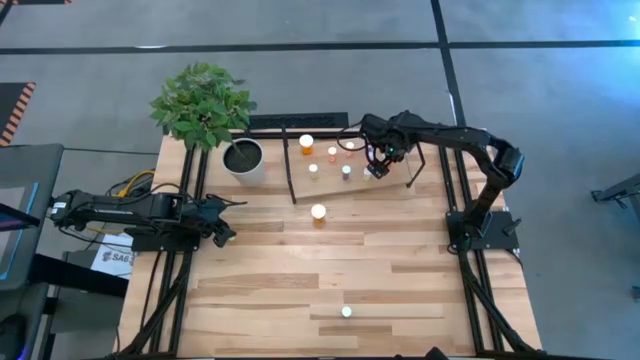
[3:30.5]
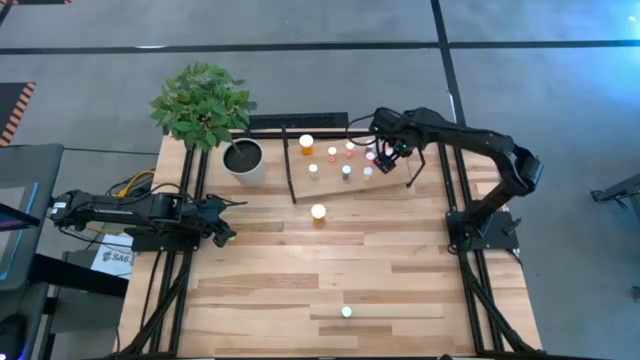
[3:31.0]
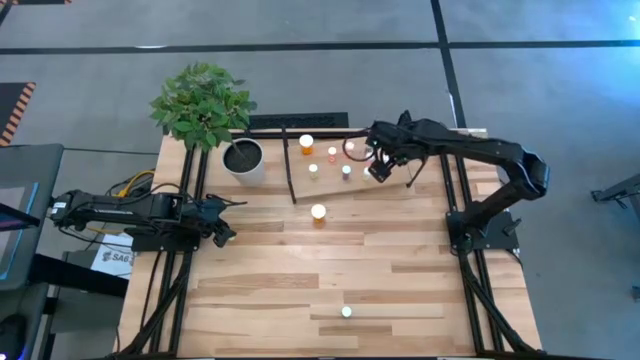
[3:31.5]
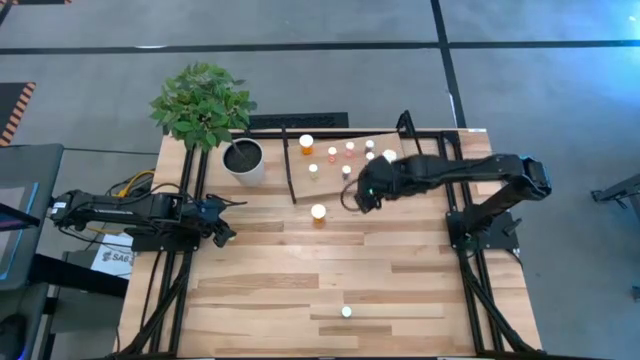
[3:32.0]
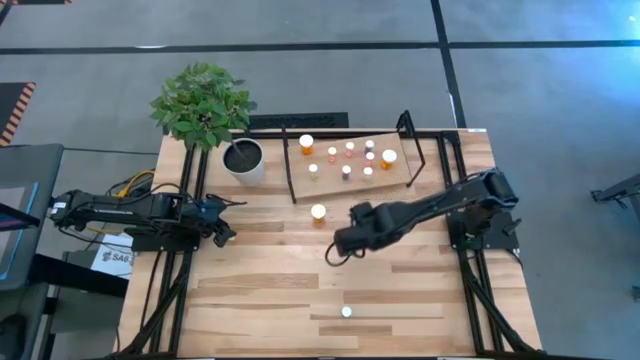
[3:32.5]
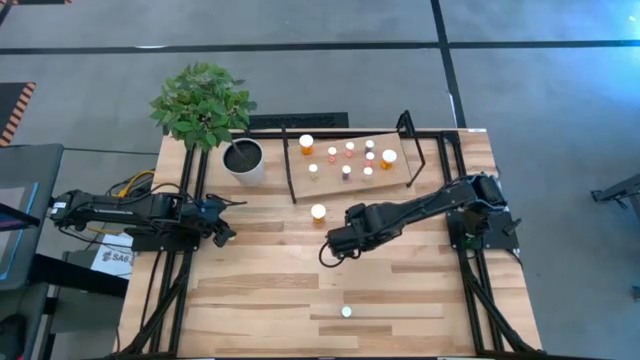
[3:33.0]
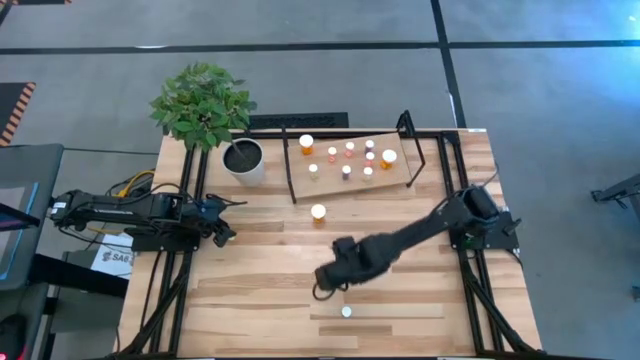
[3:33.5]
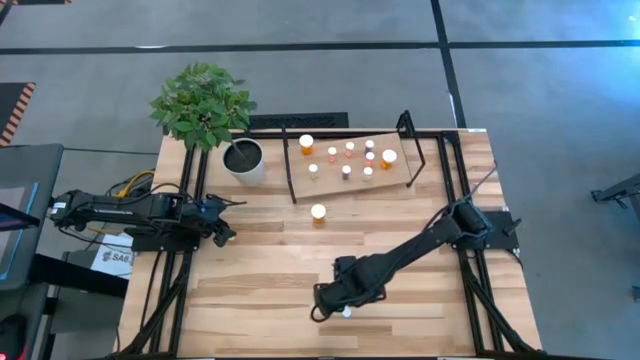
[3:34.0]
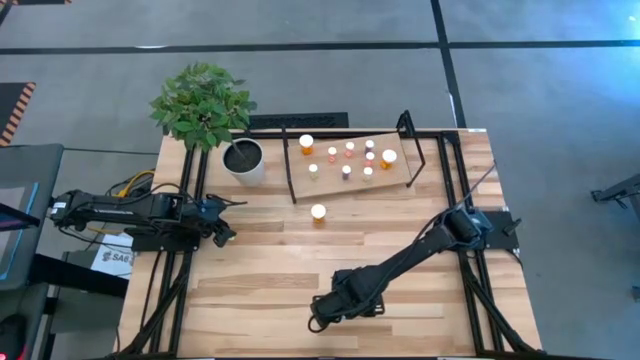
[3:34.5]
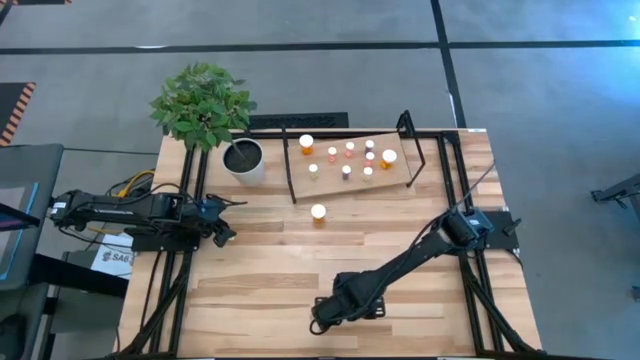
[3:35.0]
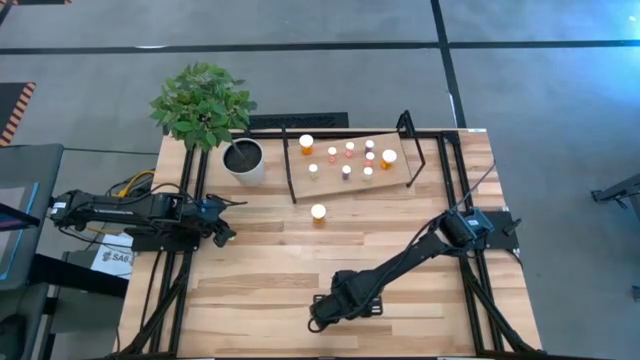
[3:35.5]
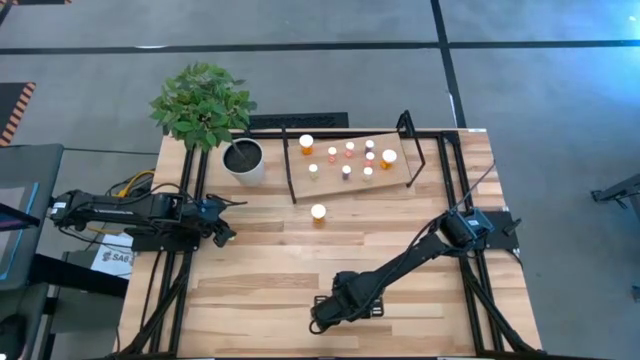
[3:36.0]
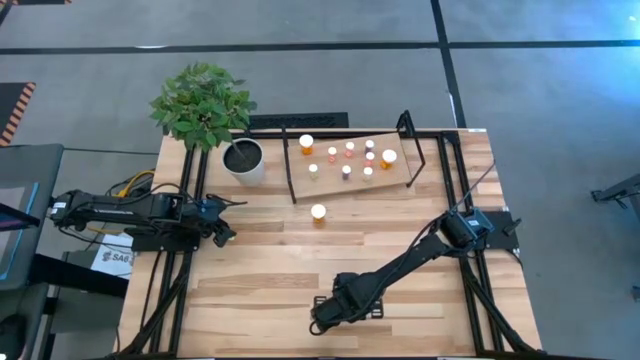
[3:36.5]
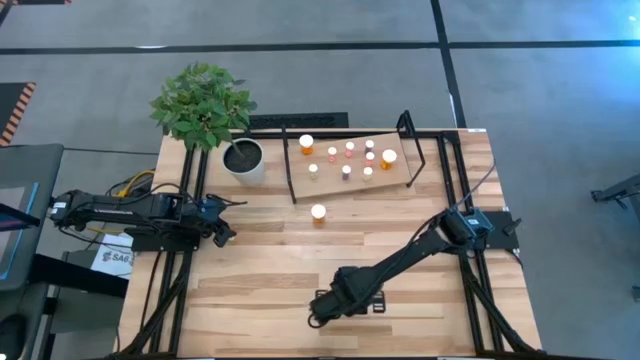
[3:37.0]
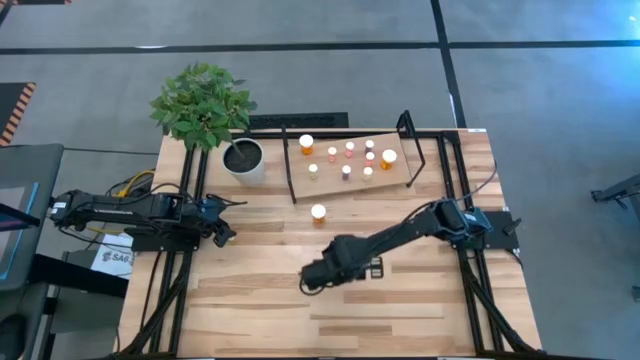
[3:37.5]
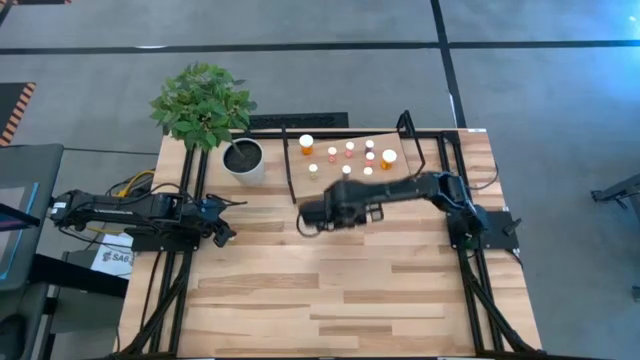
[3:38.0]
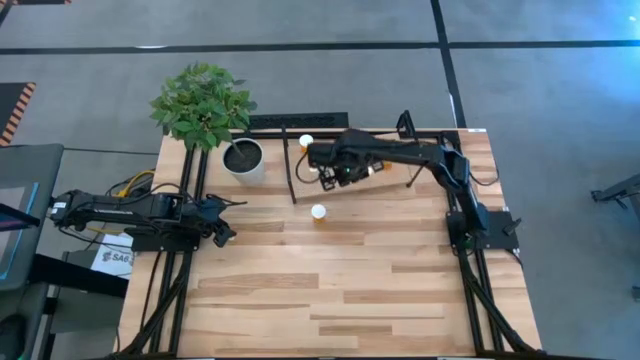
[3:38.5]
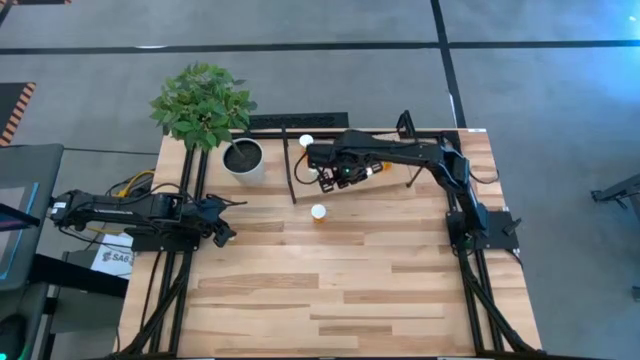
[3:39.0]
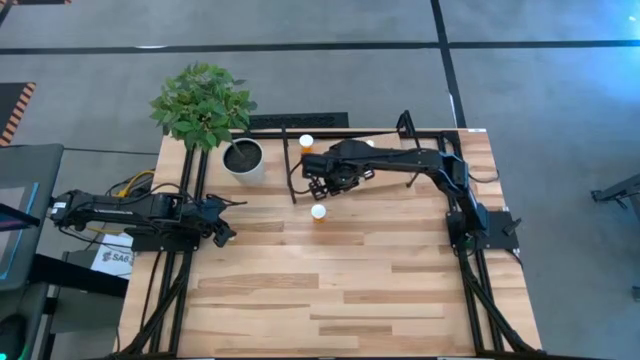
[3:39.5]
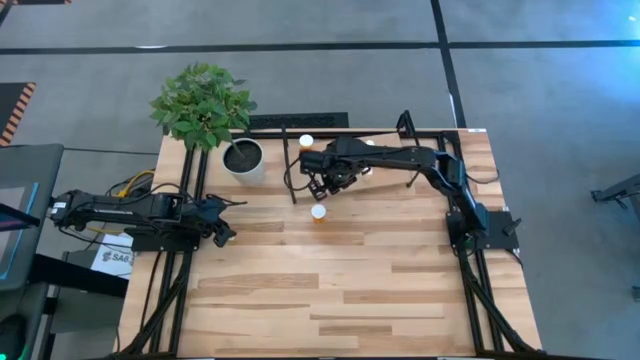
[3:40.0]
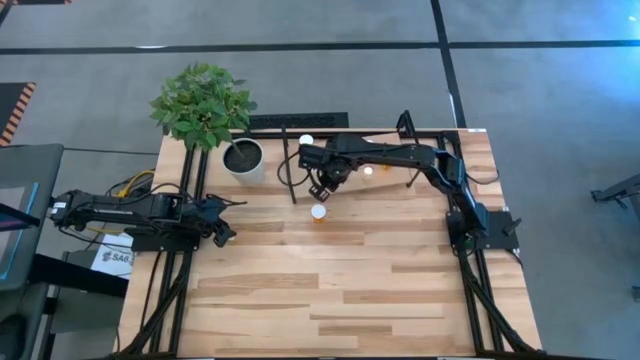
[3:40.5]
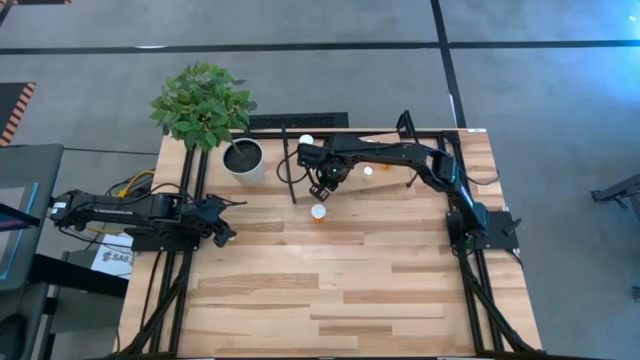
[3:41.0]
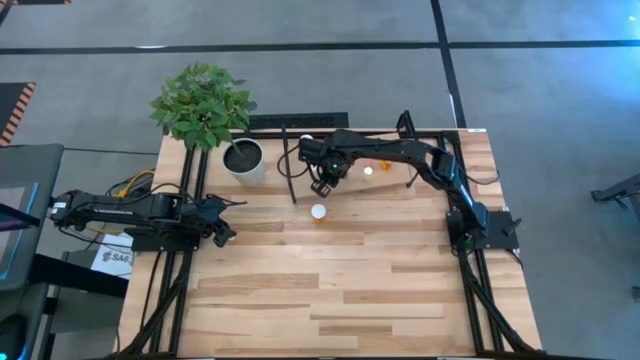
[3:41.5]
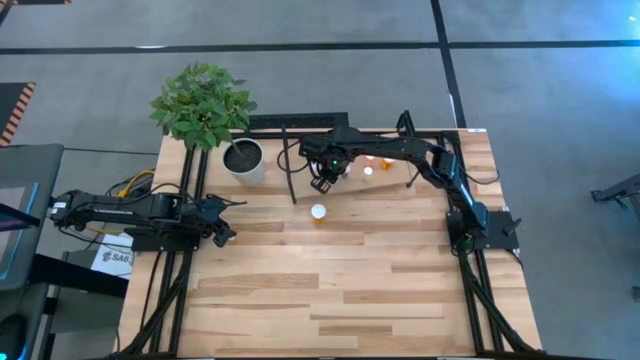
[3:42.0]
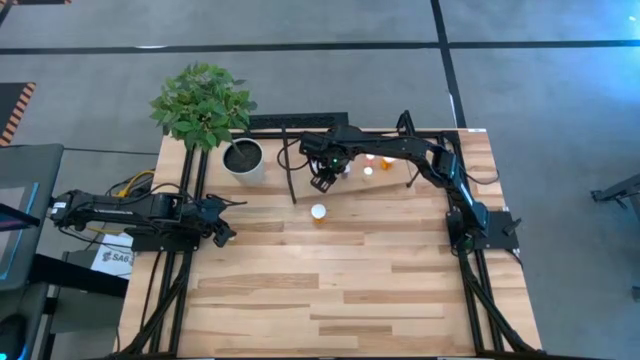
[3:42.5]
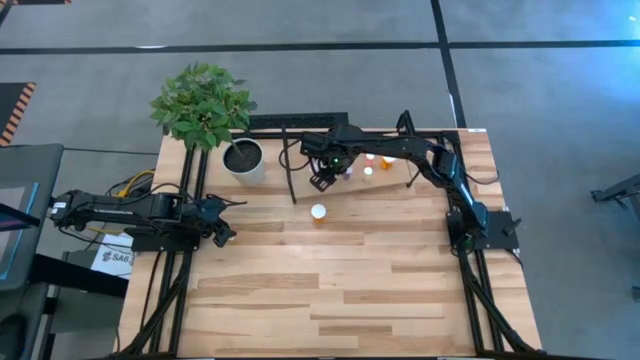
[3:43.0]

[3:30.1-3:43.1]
Task: Pick and place medicine bottles onto shelf by color
Put the blue pill bottle on the shelf

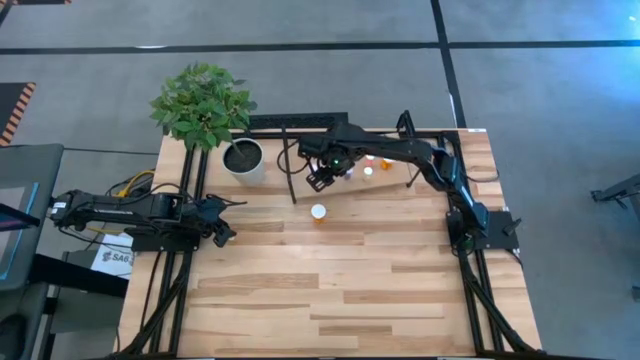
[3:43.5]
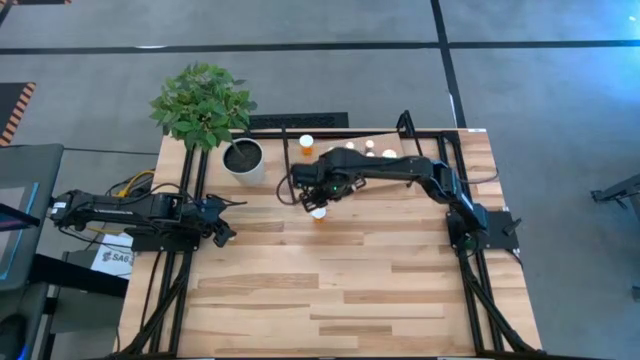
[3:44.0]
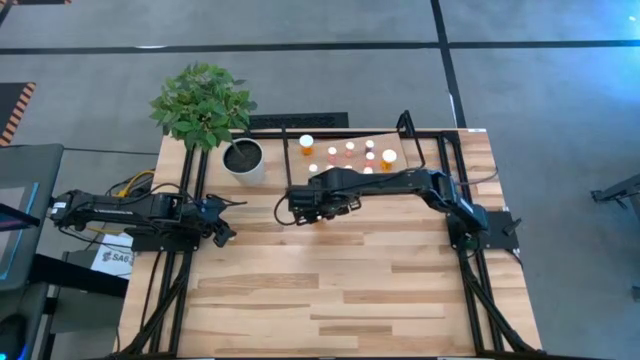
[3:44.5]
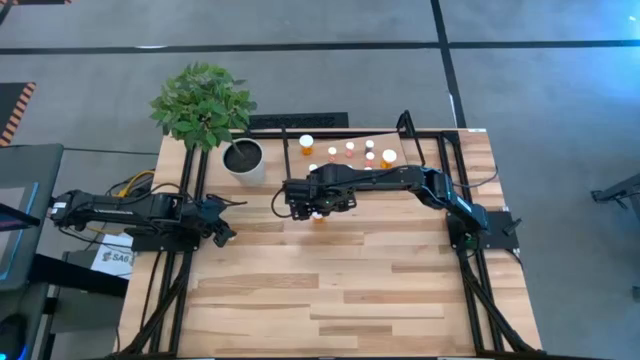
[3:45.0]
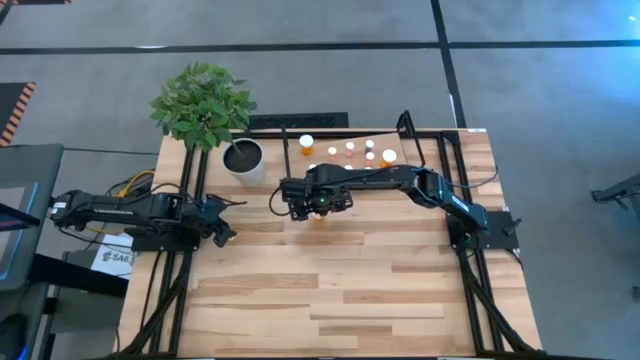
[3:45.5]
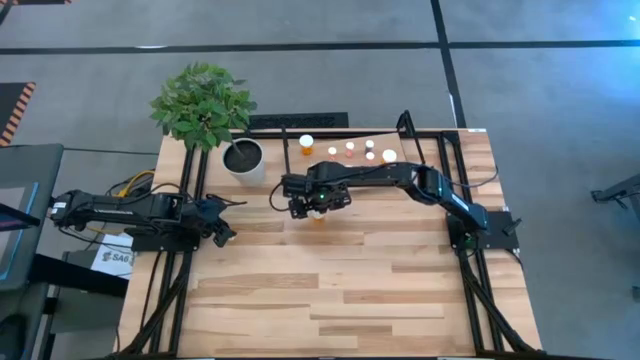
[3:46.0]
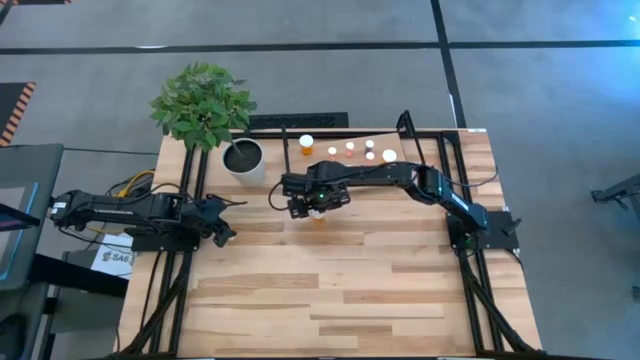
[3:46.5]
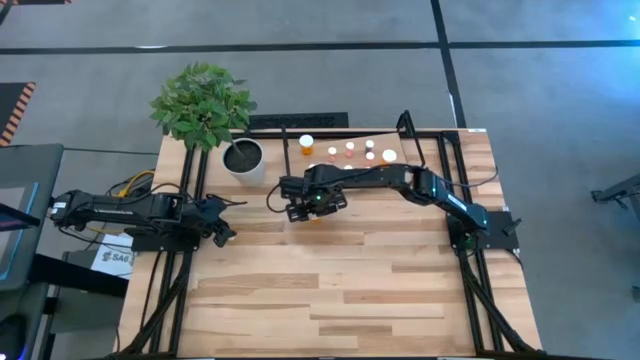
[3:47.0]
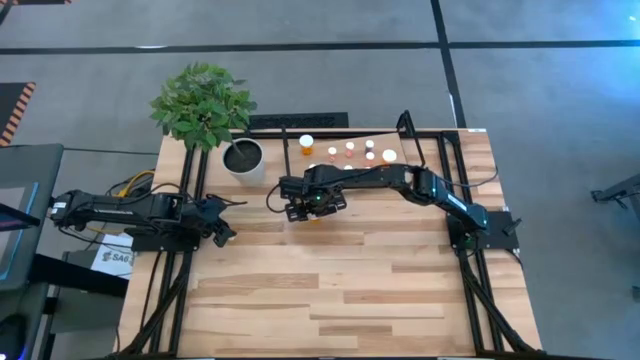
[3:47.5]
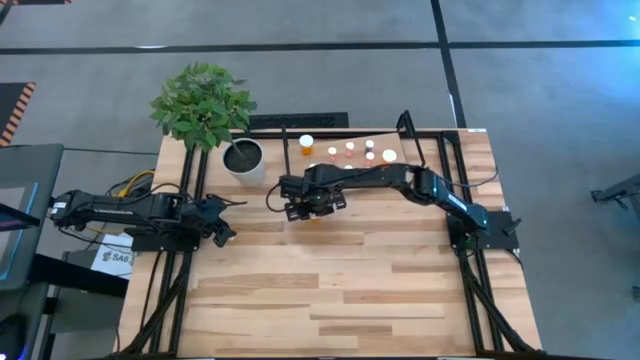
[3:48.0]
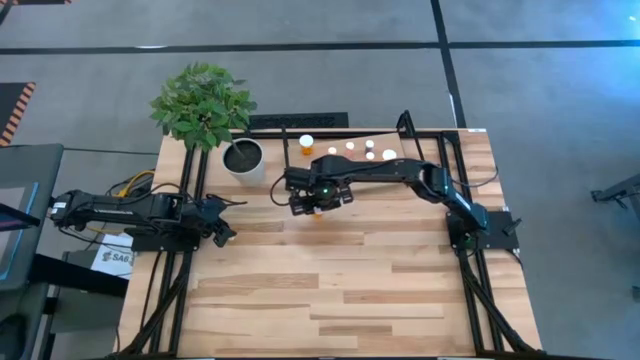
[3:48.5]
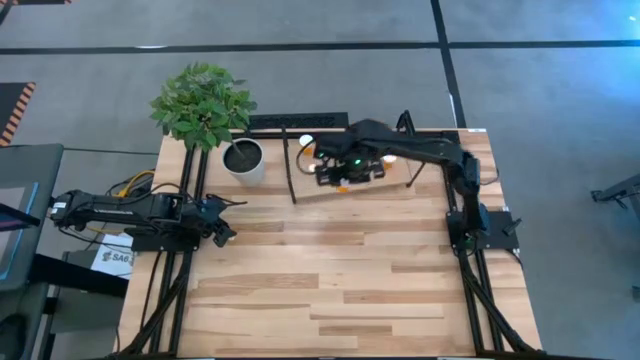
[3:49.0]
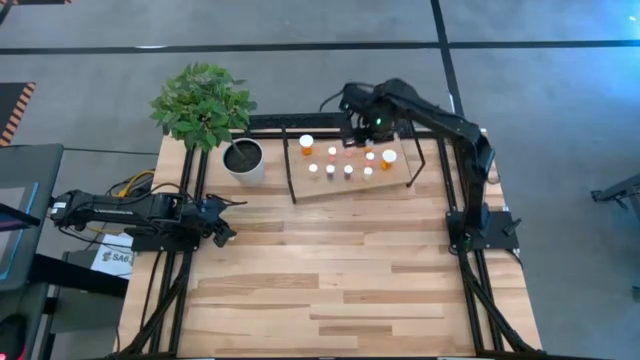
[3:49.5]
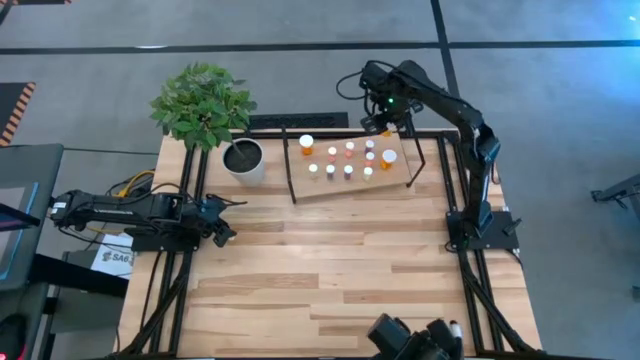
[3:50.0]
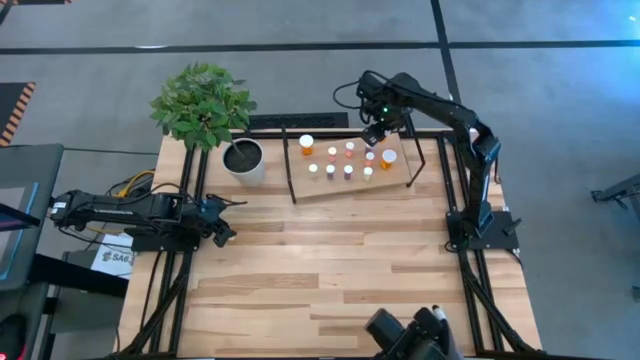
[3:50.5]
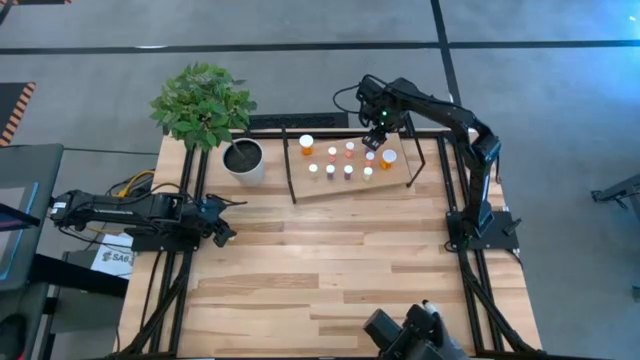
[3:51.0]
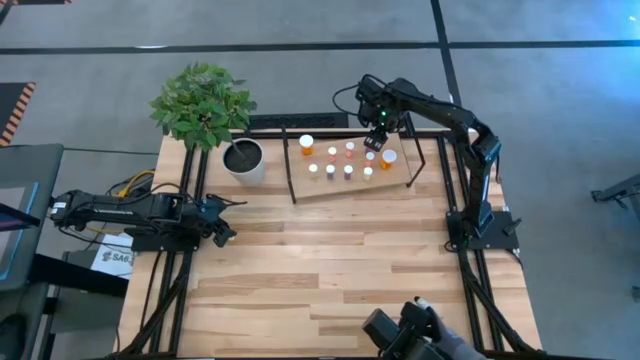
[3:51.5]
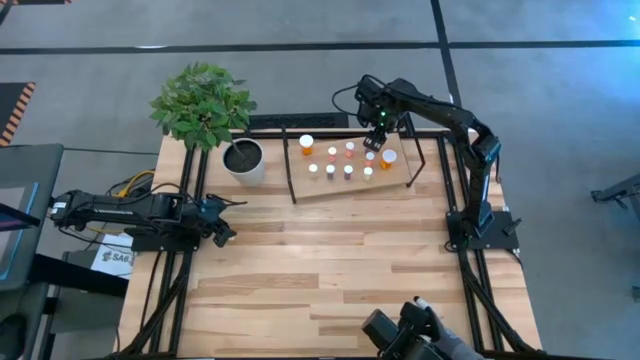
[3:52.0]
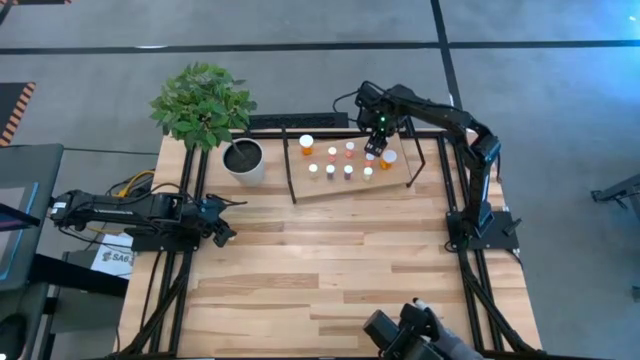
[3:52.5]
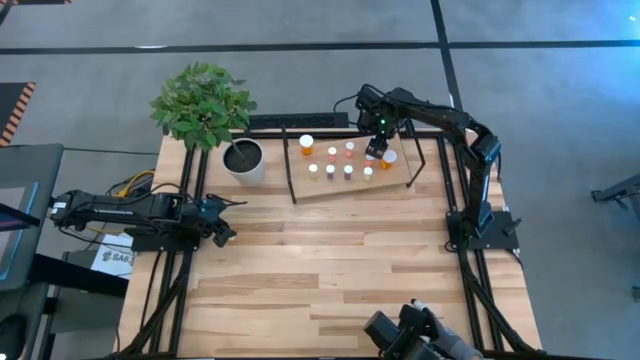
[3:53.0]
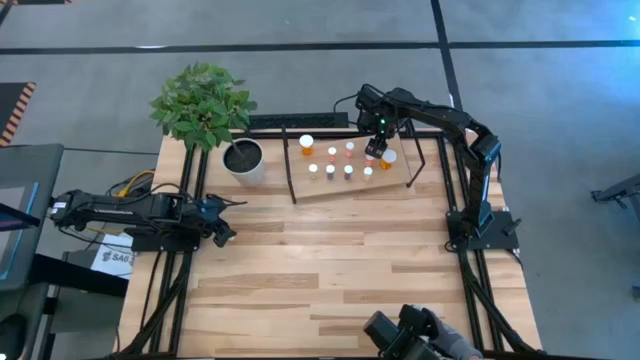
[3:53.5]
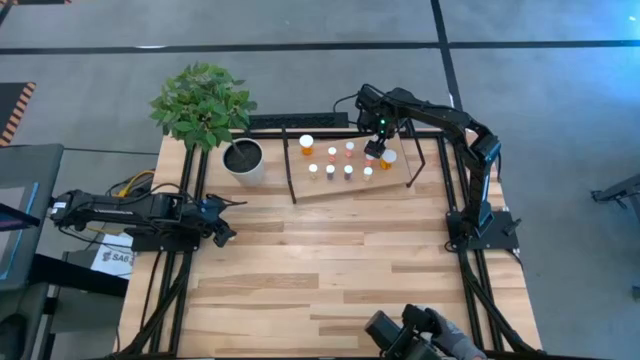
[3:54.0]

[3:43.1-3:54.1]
Put the orange pill bottle on the shelf
